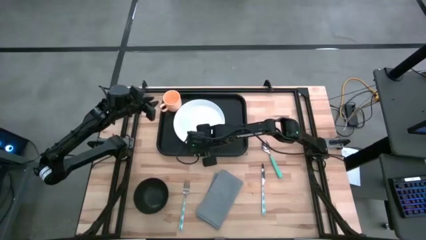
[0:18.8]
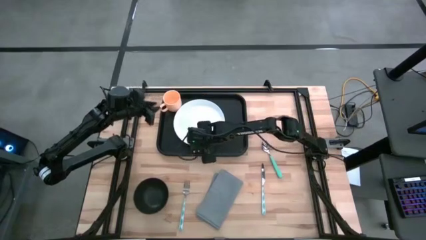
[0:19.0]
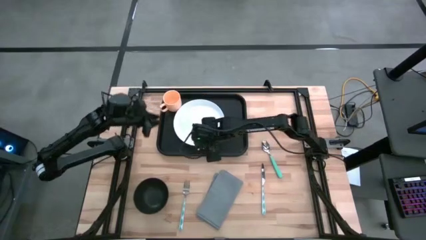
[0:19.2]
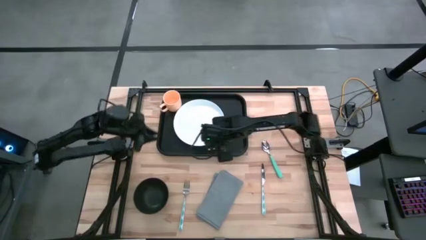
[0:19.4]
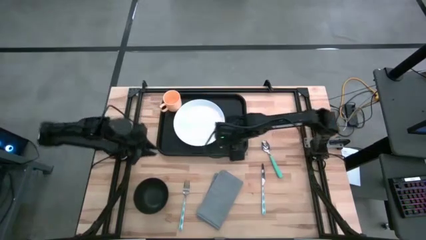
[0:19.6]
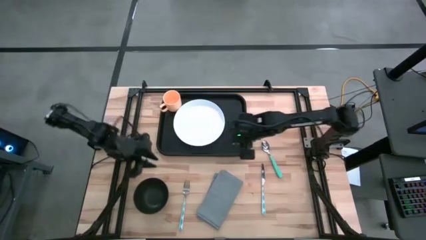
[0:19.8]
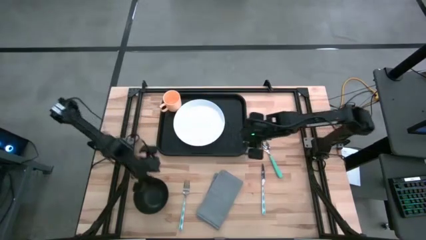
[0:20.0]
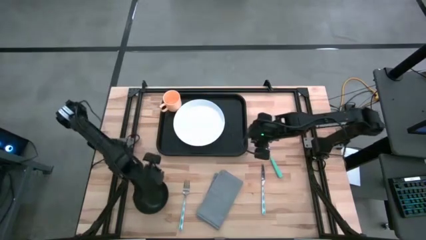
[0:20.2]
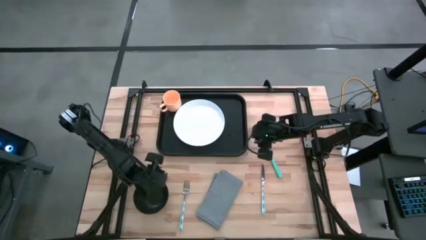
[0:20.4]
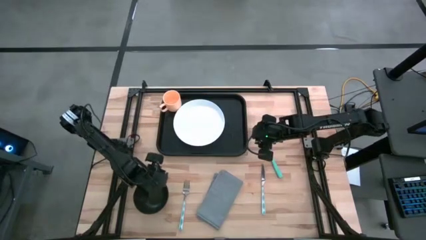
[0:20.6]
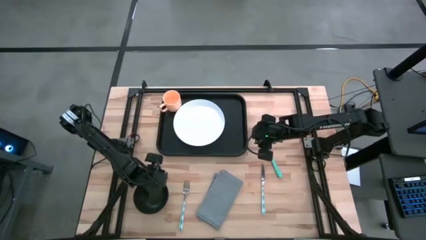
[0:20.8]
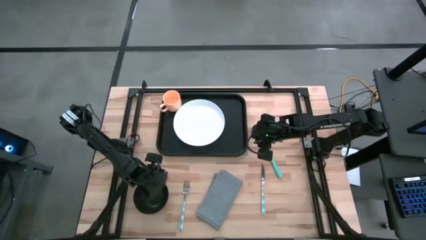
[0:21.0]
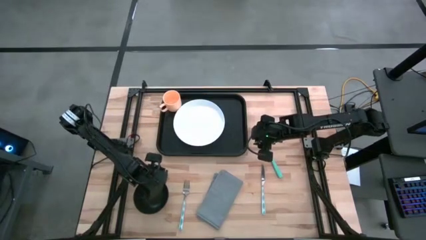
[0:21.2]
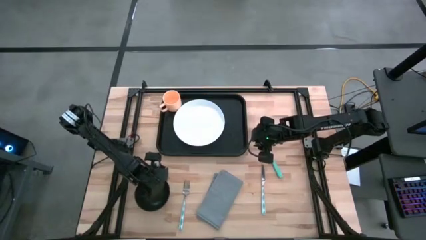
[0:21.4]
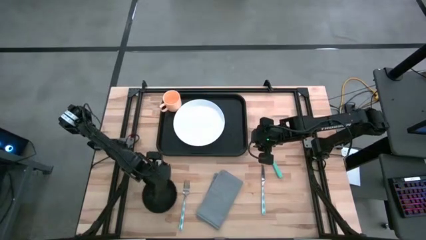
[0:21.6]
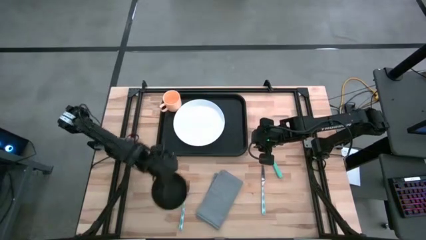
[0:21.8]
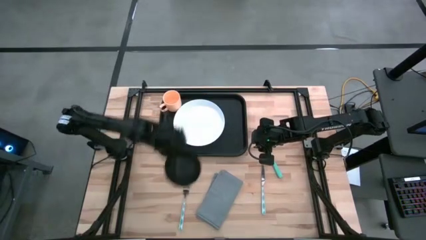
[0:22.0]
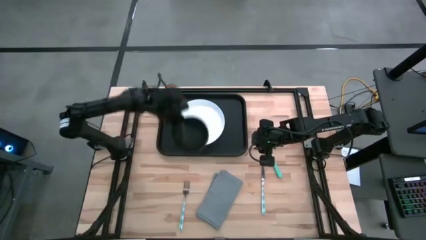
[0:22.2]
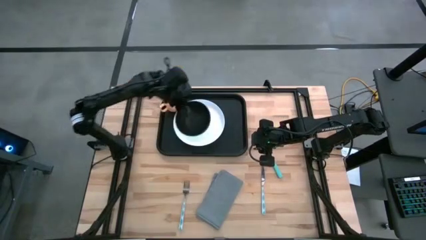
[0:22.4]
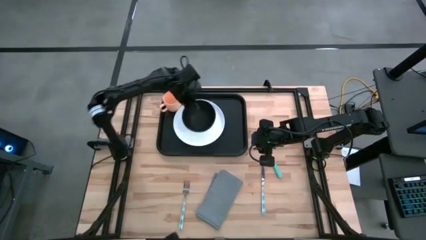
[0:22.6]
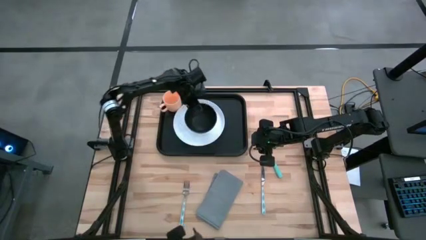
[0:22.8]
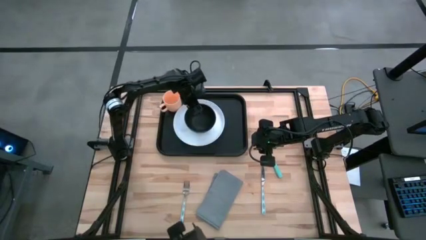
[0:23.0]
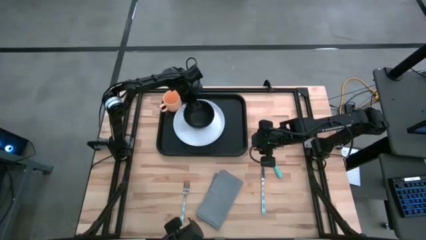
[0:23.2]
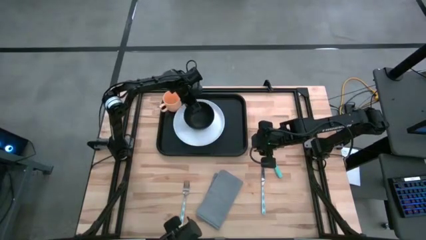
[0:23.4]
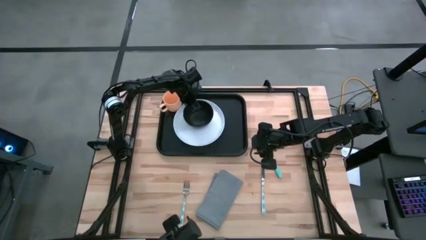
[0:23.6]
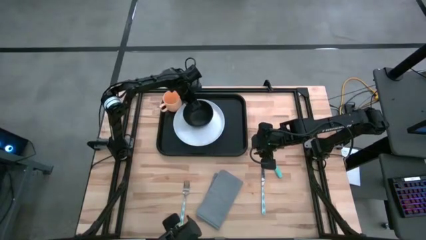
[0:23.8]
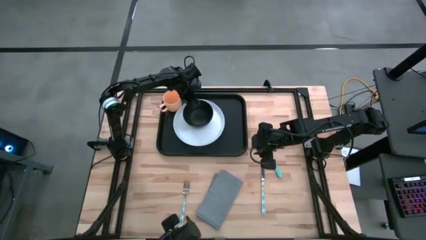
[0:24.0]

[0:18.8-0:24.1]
Task: Set up tray
Put the bowl on top of the plate on the serving tray

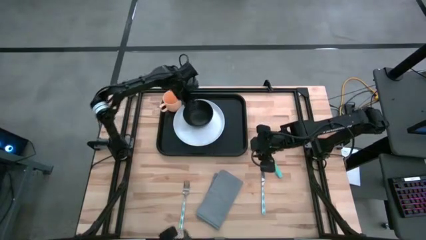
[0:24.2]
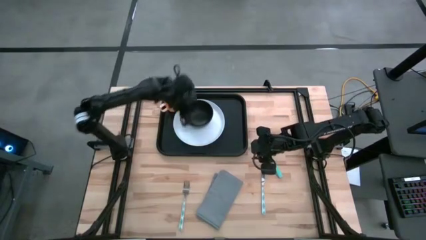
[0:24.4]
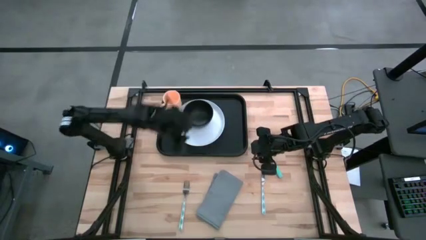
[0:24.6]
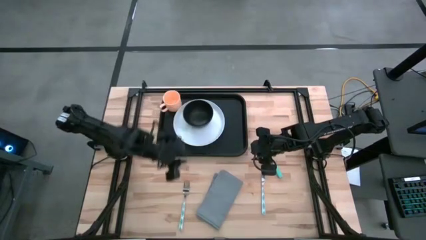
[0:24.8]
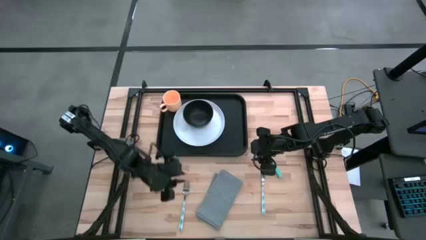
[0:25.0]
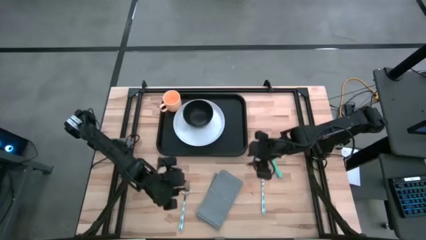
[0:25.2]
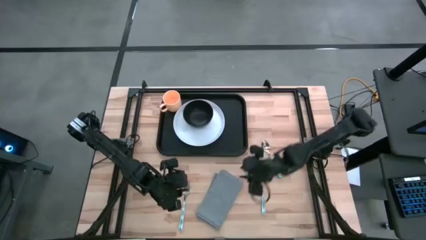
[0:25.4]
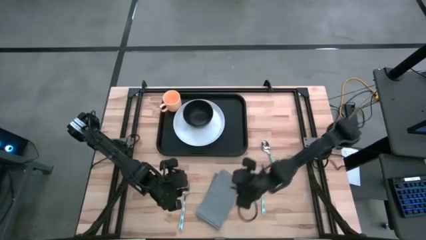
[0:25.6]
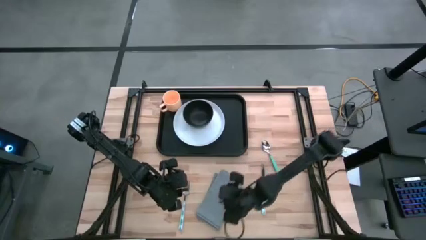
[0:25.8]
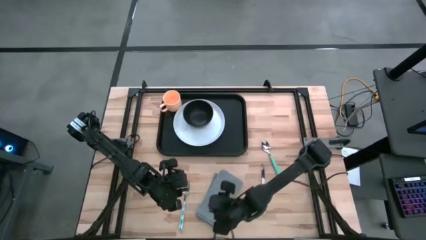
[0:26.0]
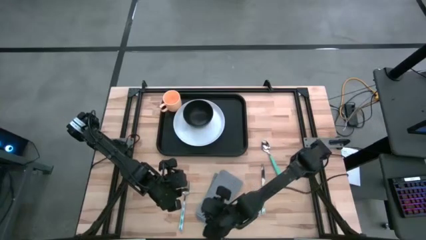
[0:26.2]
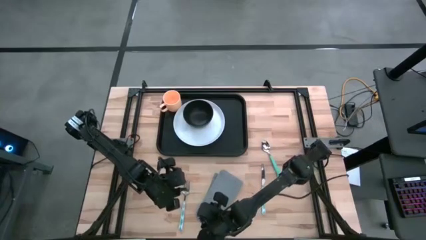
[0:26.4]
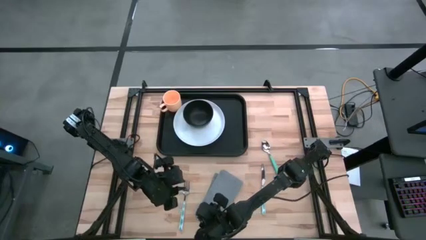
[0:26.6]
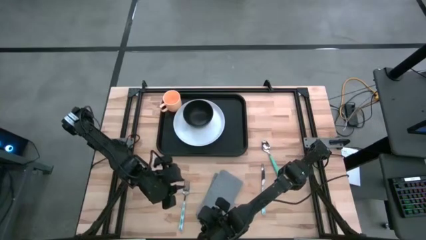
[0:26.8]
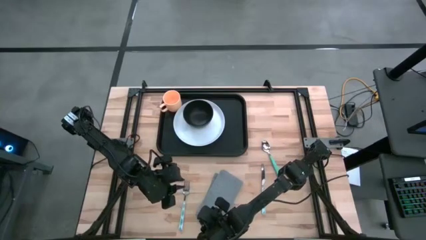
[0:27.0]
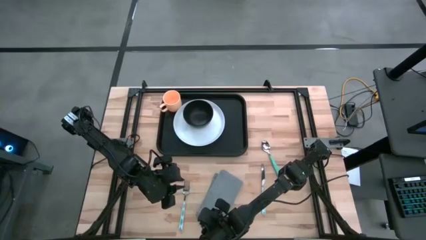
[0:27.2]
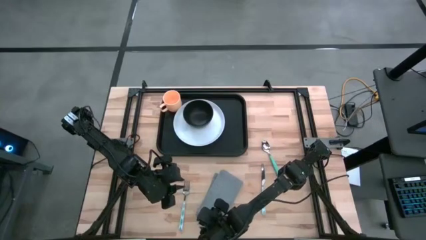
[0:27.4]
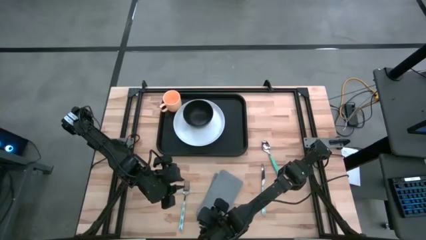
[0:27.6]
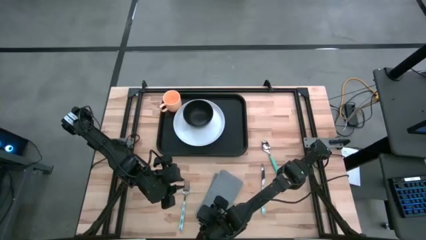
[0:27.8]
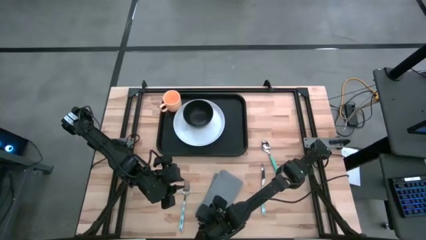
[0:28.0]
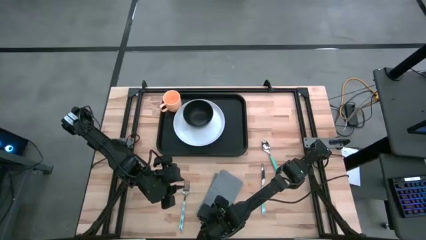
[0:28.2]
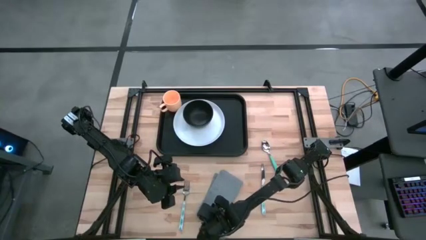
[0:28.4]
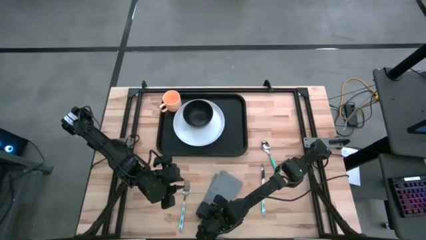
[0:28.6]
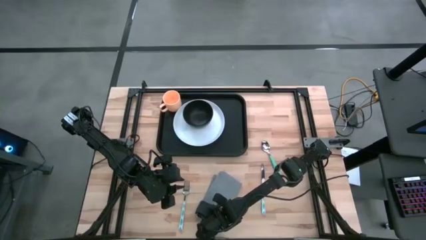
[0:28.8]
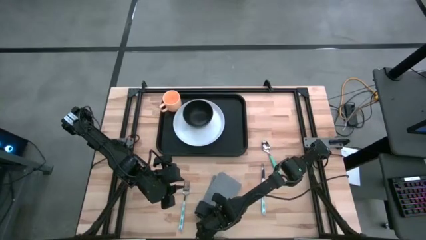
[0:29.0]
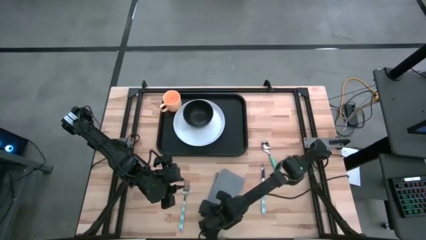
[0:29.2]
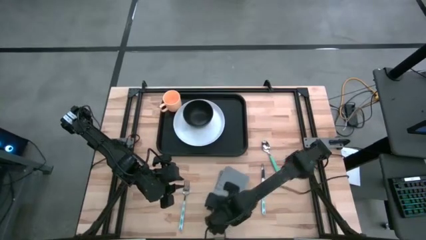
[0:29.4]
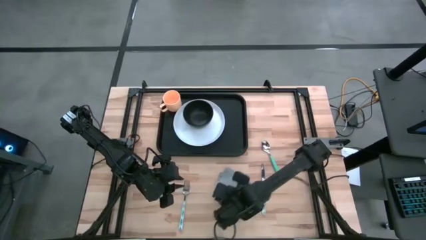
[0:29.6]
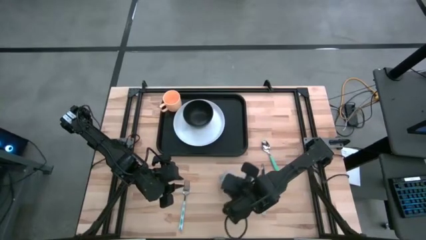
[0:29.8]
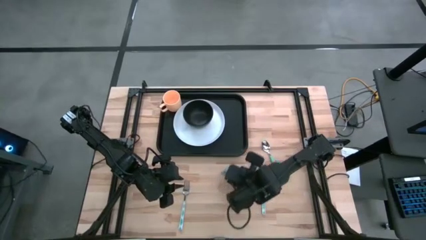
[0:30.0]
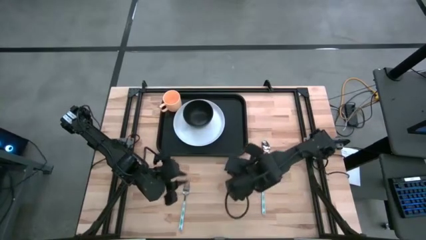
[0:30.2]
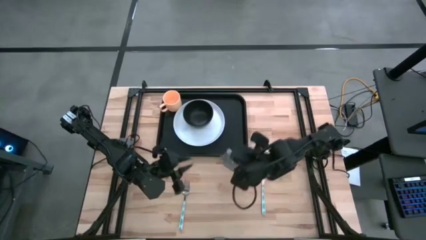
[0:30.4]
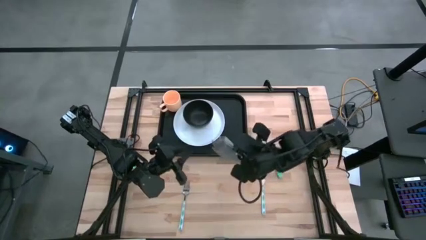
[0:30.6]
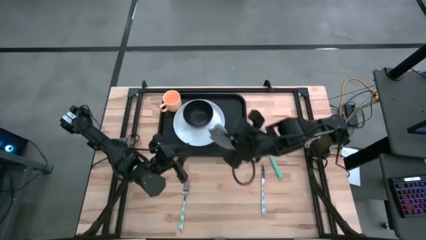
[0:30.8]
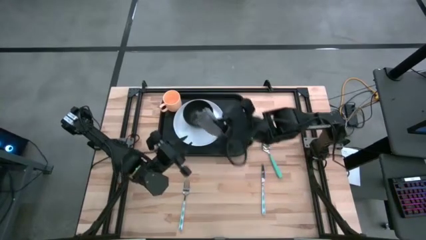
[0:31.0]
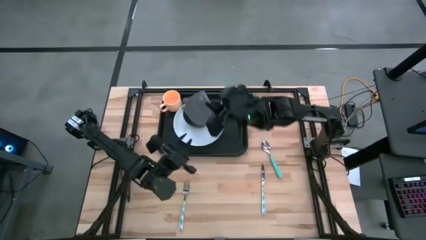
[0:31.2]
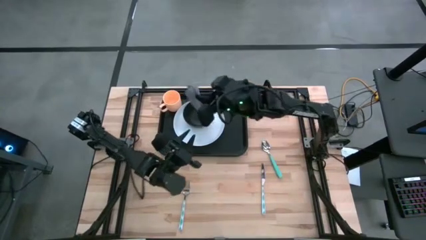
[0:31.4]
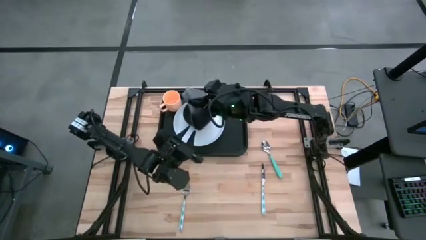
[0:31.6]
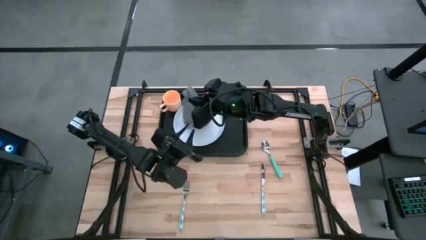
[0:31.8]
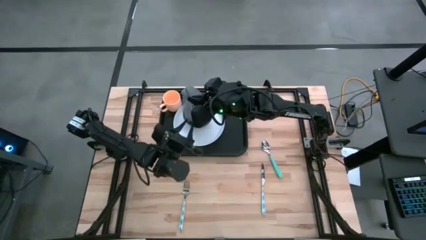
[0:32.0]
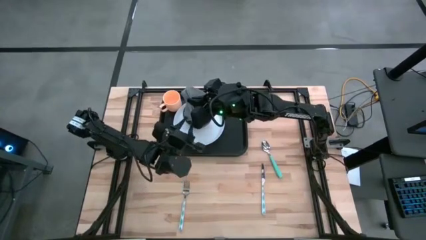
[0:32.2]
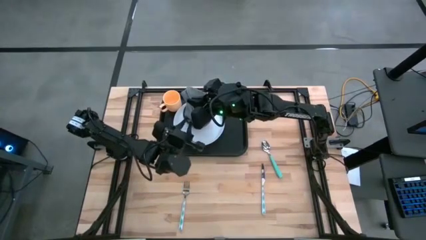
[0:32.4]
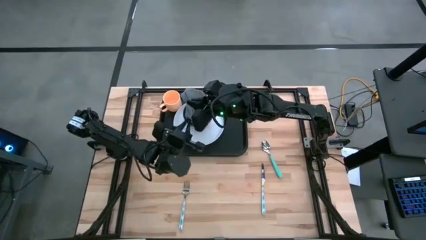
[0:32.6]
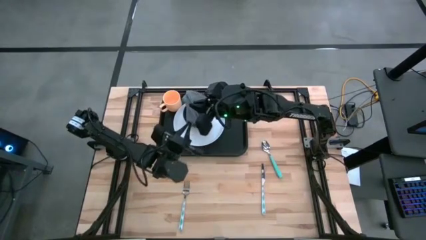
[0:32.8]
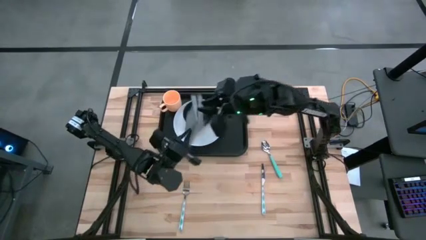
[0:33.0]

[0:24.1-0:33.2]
Put the napkin to the right of the plate on the serving tray
